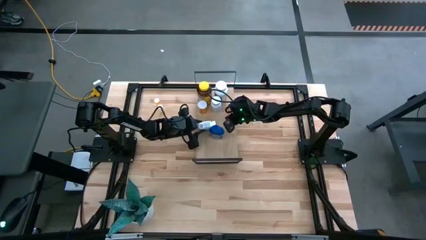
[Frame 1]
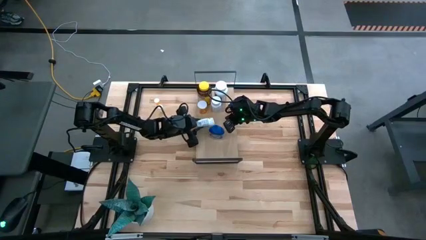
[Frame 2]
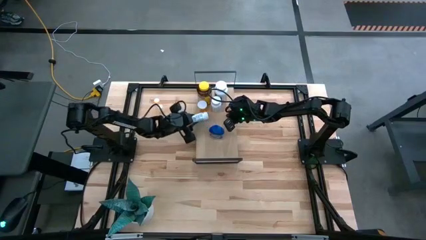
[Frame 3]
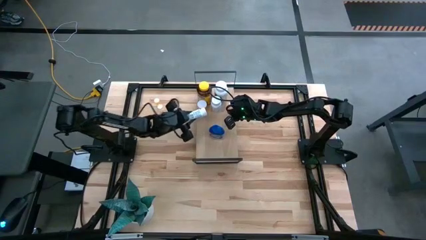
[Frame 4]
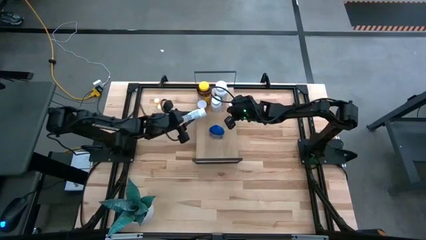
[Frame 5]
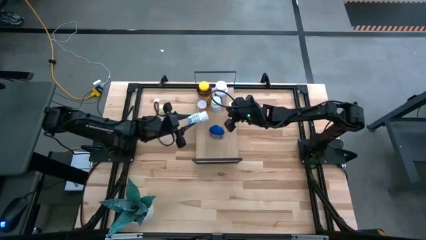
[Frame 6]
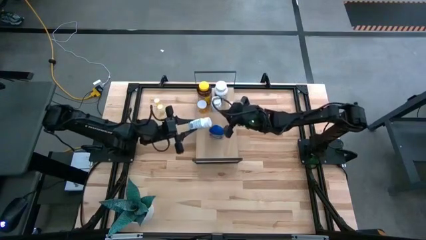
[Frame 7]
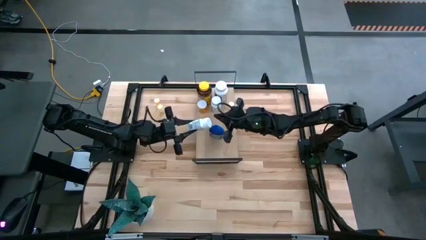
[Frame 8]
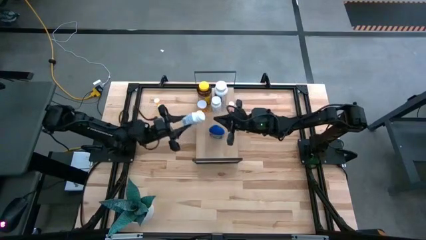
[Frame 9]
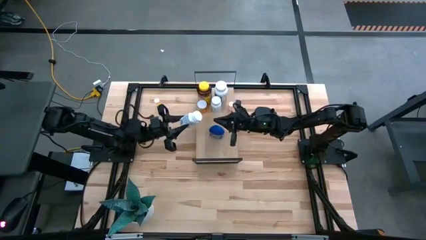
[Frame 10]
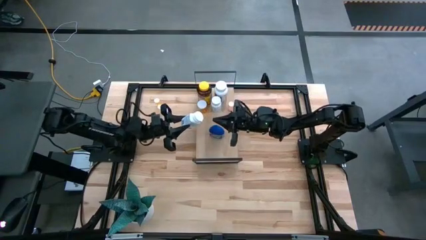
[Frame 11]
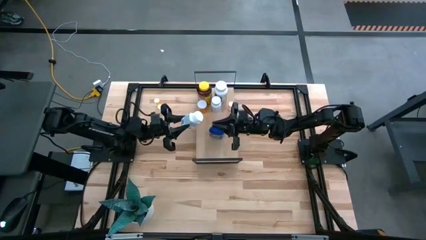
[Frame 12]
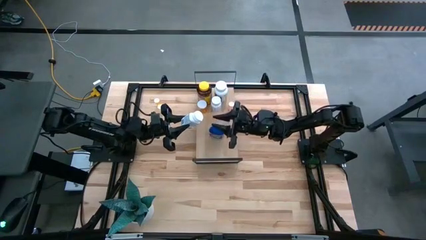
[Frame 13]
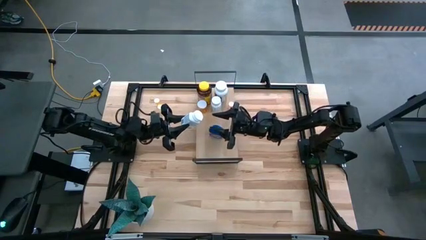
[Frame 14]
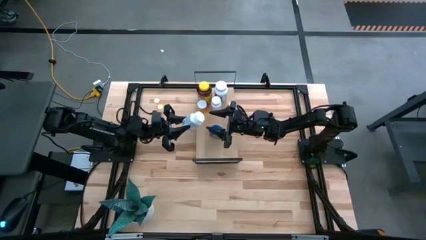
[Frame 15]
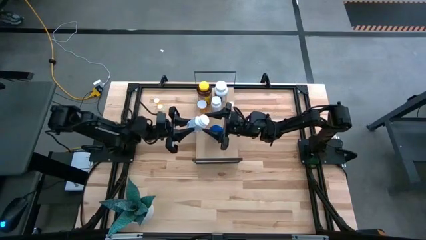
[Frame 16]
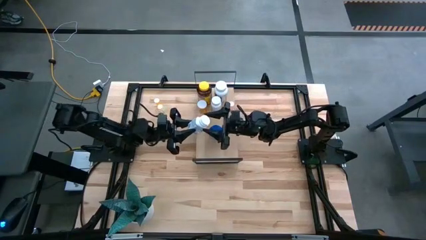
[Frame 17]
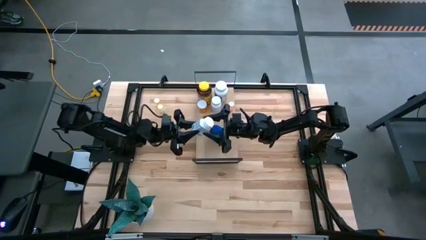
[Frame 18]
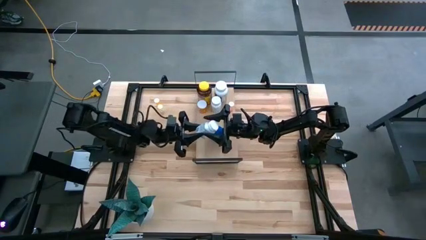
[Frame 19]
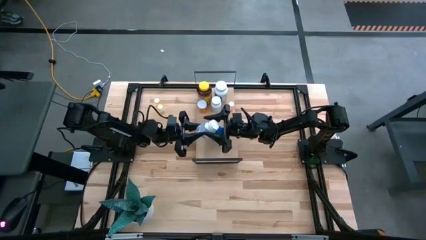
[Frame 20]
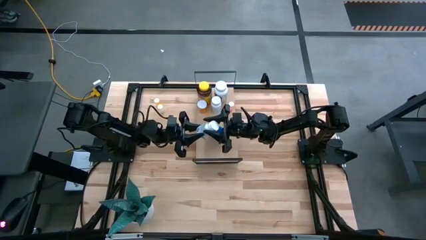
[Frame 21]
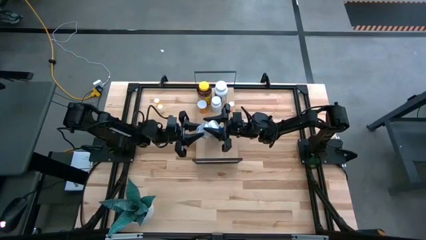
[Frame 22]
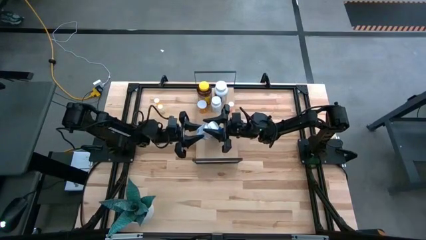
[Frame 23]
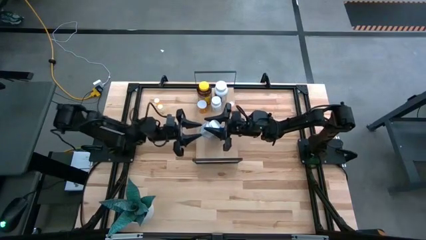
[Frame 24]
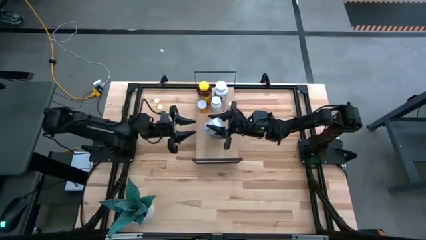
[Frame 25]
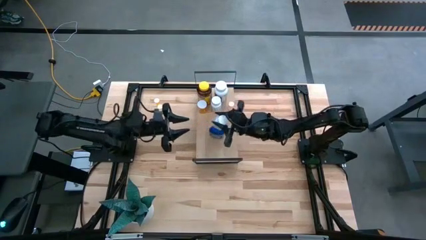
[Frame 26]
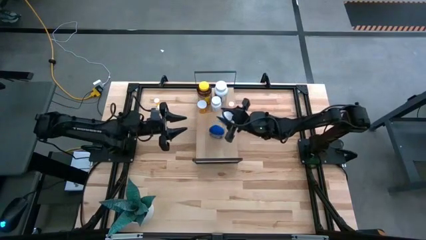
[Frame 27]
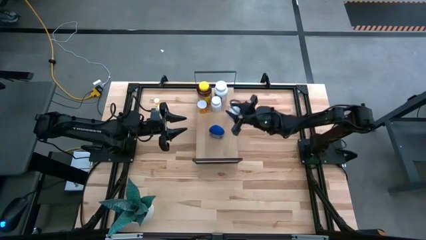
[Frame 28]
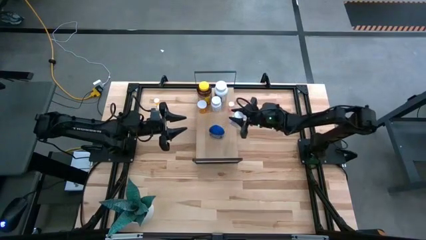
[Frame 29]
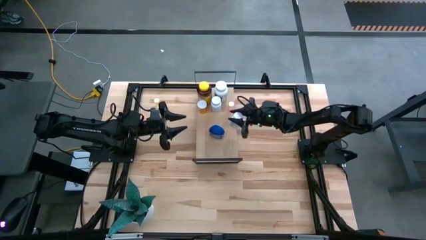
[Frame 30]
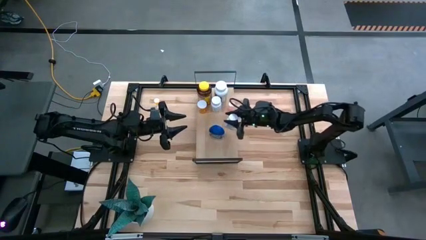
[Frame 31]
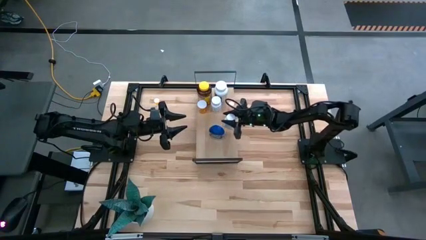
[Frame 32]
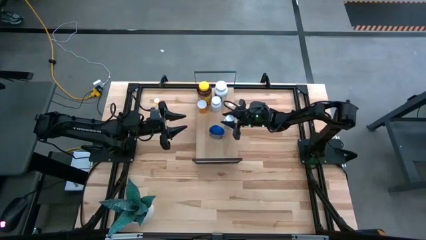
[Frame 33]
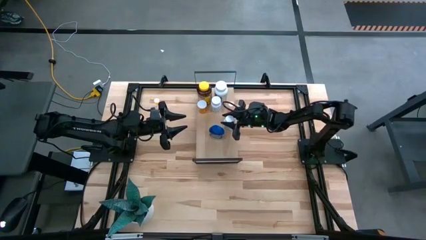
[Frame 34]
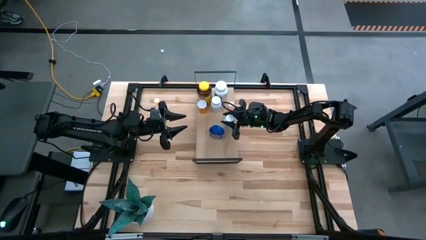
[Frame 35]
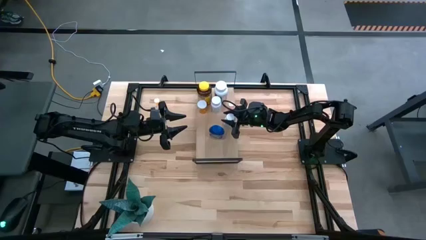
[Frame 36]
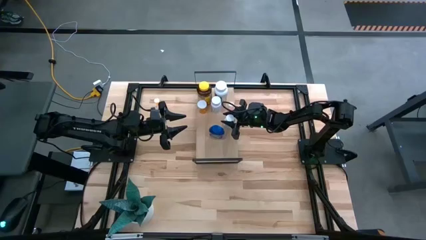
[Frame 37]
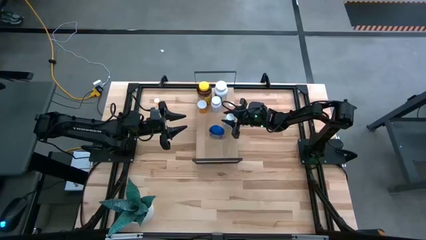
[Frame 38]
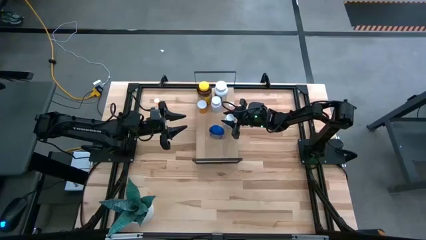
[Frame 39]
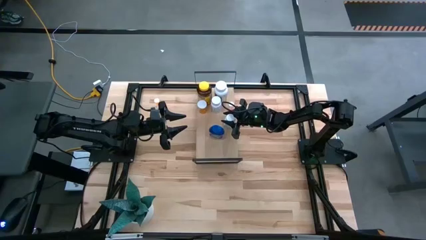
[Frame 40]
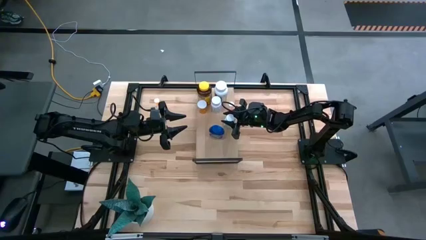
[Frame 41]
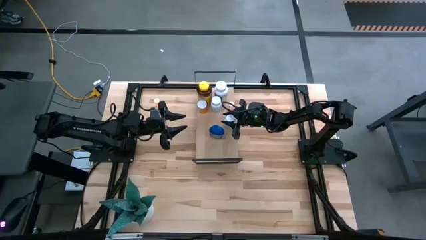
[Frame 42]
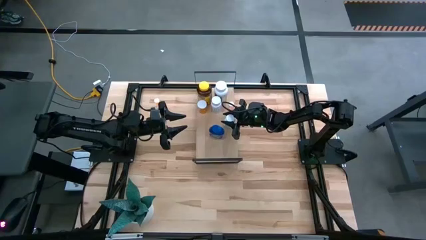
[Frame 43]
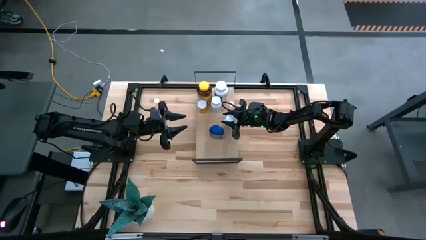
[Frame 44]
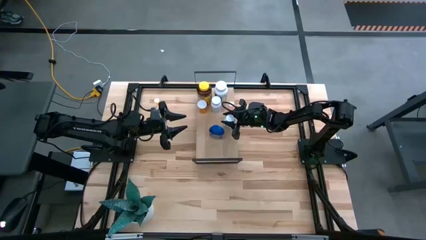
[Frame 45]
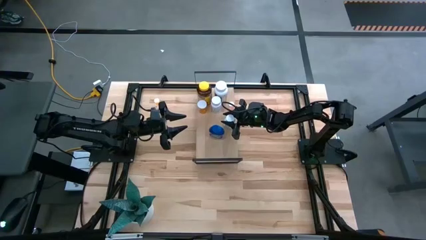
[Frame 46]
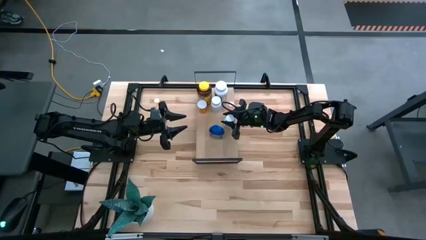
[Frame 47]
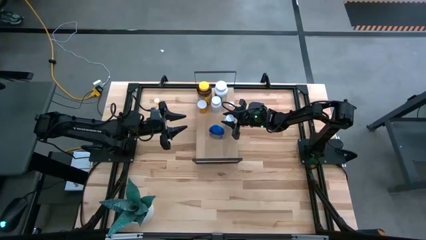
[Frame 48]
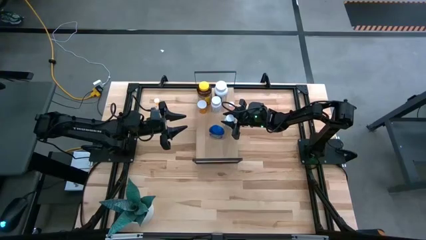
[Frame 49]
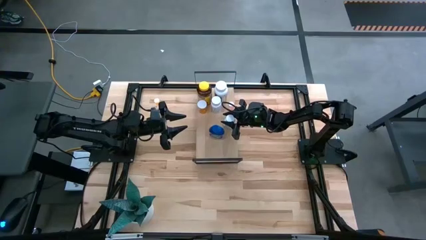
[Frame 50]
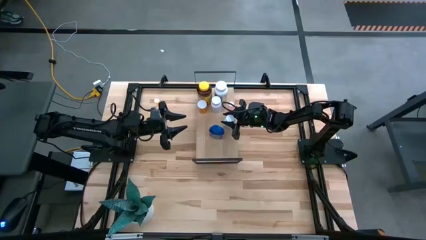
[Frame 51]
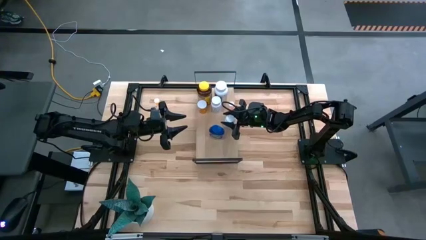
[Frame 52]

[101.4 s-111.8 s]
Task: Pick and place medicine bottles onto shelf by color
Adjust the white and blue medicine bottle on the shelf

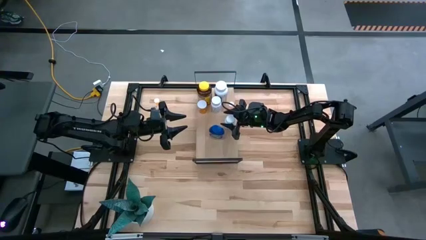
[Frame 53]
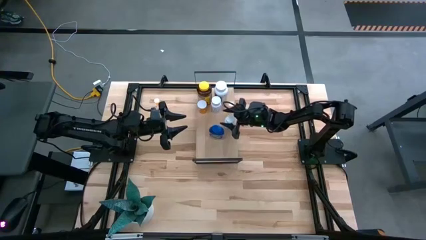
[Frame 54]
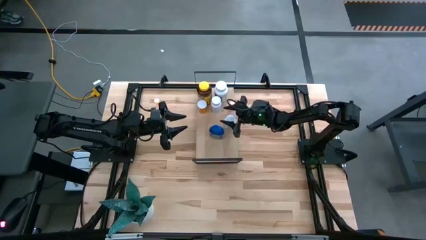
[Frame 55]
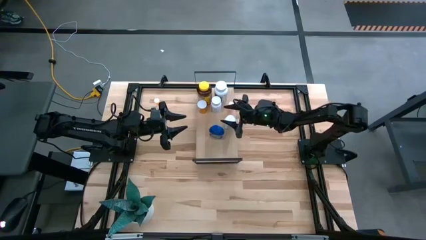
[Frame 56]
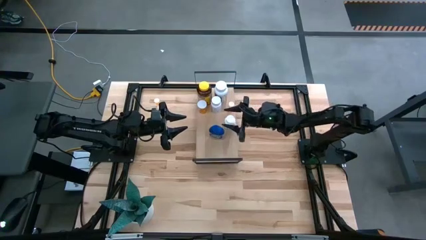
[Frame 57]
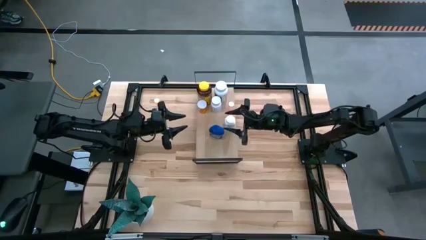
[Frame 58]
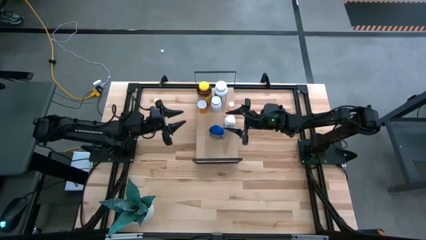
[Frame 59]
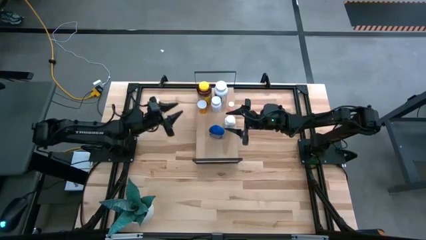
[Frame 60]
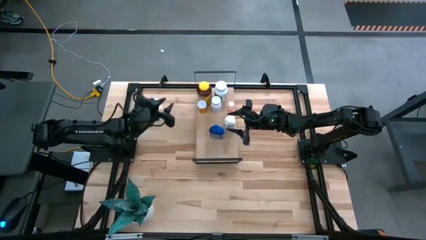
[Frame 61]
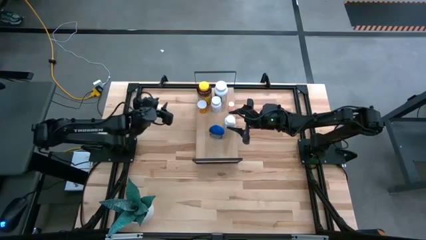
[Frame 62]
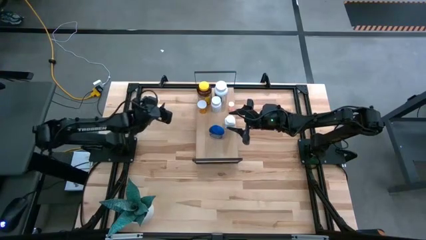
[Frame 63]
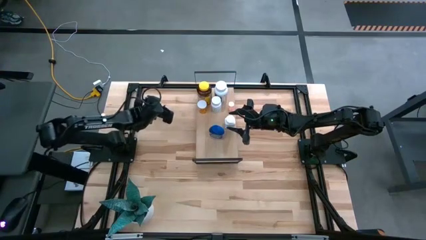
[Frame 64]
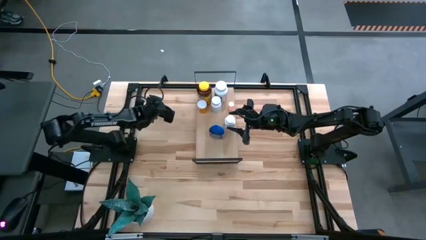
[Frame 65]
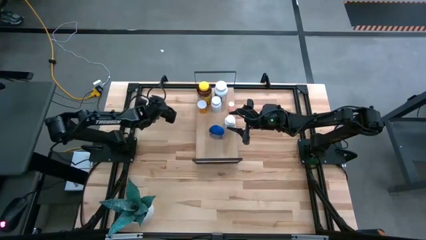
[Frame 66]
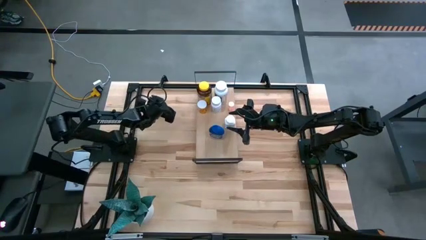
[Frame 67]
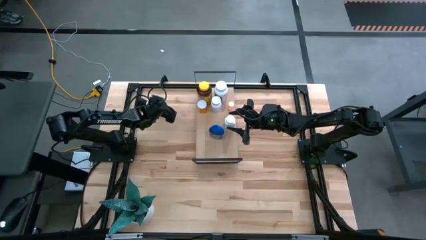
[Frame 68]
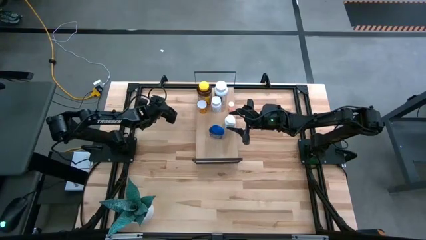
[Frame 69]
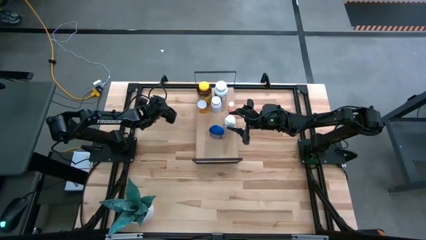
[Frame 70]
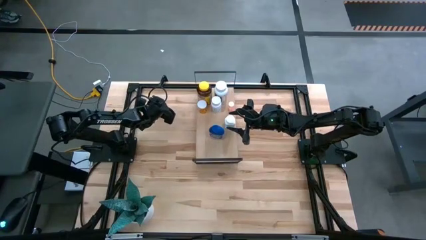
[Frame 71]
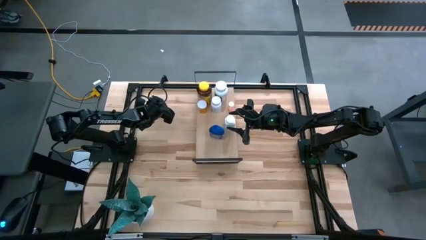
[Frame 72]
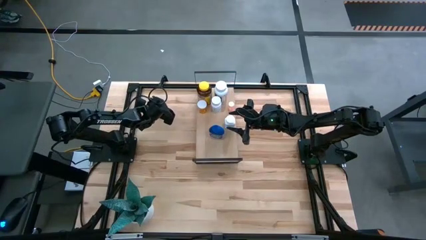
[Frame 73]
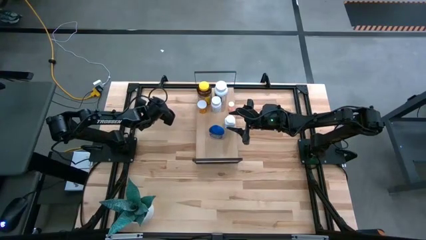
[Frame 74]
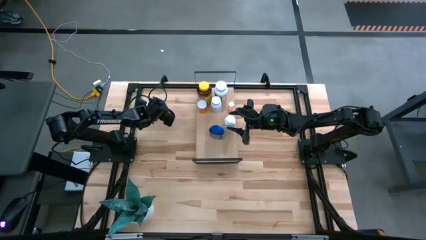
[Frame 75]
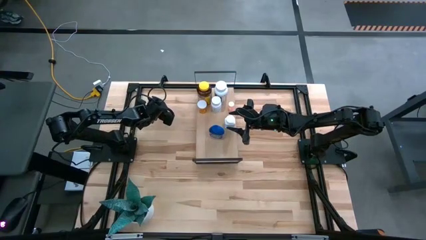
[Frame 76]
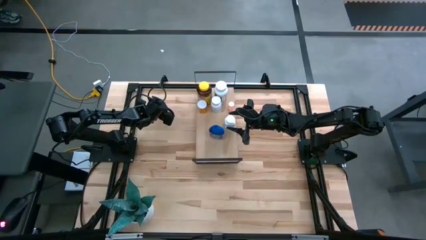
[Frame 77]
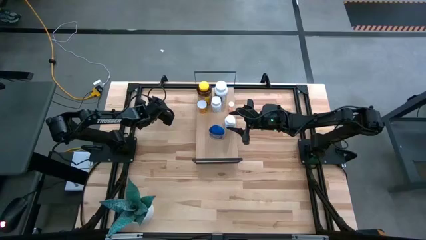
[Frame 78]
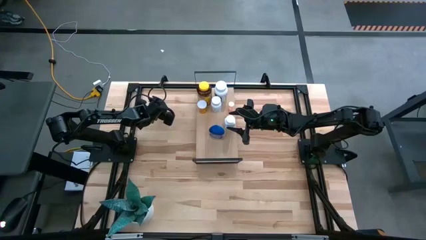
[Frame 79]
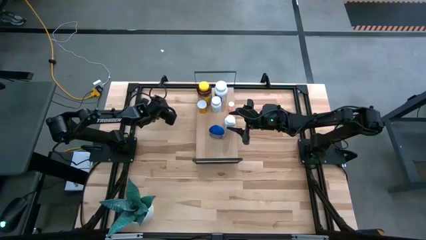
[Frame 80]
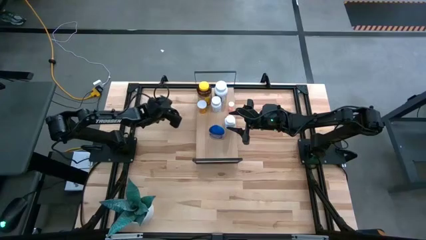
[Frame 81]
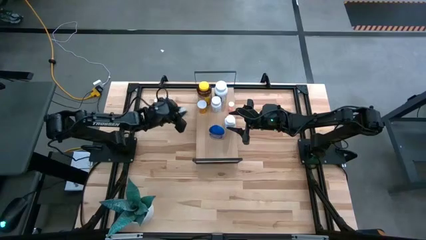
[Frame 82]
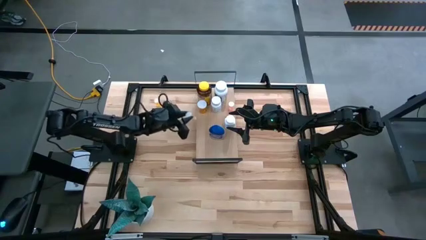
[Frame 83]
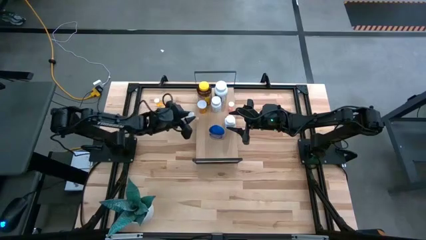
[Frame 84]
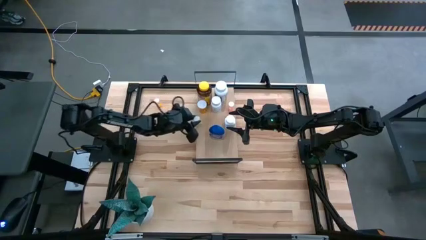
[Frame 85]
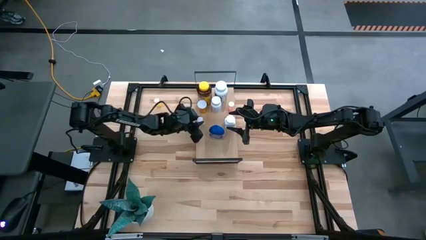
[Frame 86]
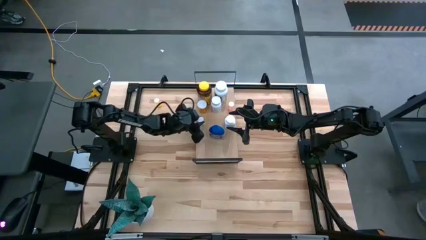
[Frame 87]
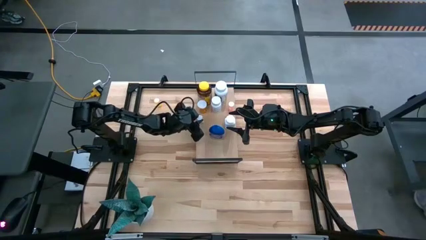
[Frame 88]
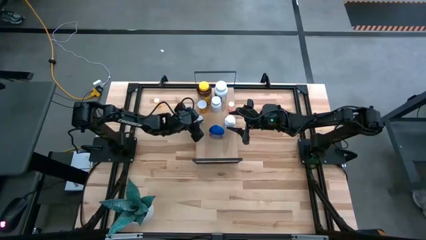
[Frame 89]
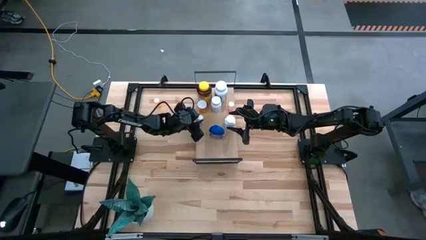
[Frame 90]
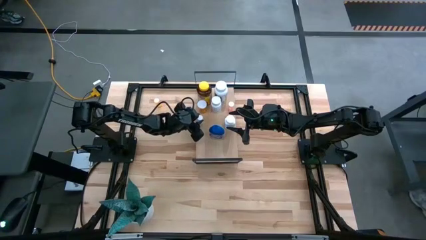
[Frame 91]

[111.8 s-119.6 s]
Put the small yellow medicine bottle on the shelf
